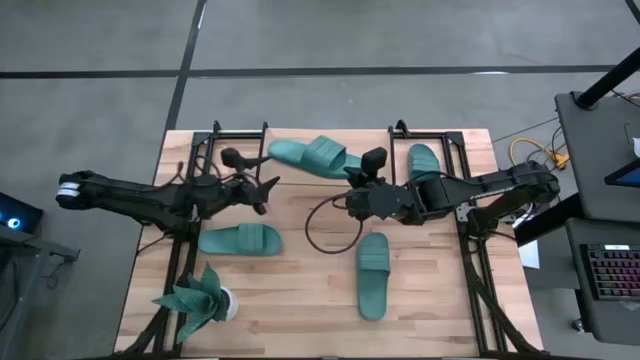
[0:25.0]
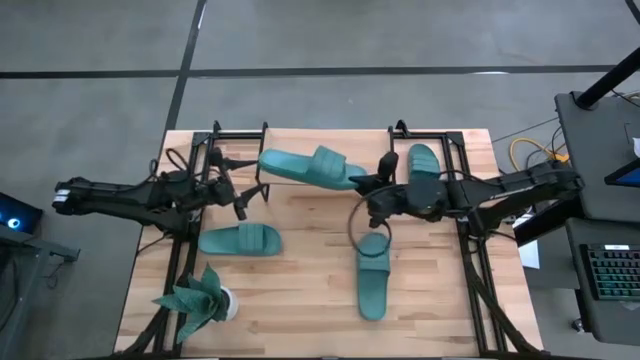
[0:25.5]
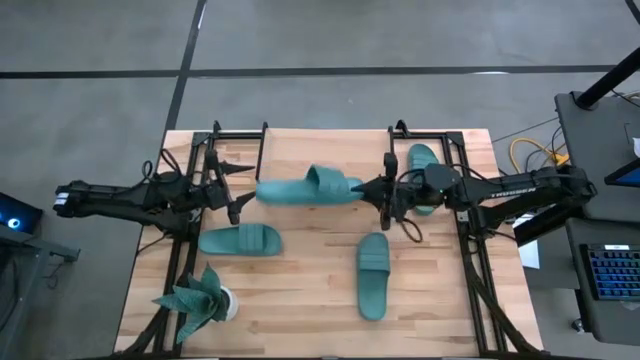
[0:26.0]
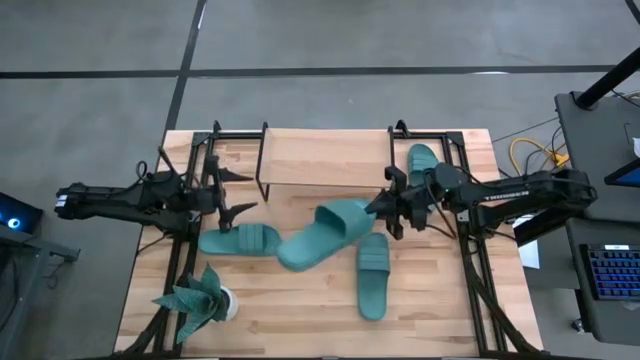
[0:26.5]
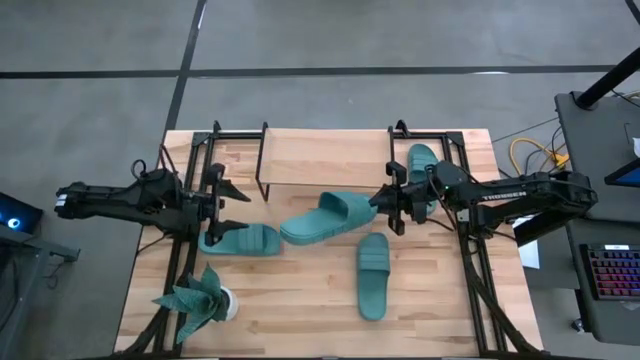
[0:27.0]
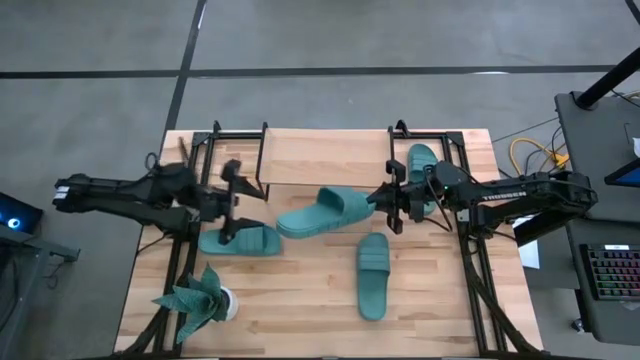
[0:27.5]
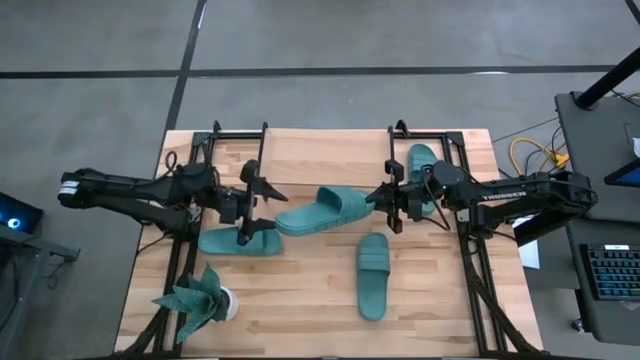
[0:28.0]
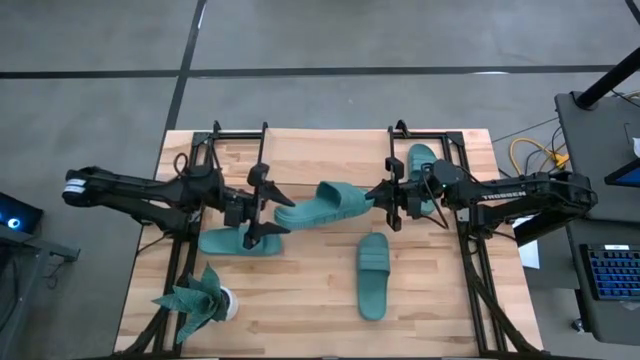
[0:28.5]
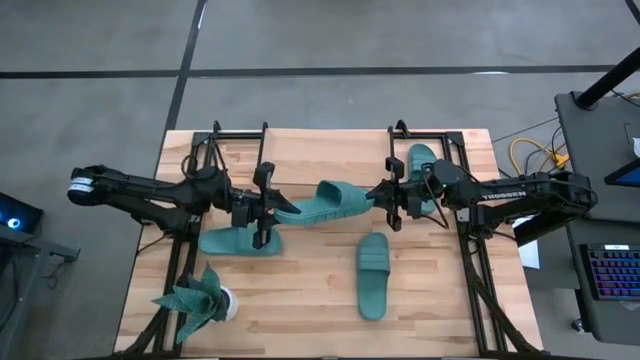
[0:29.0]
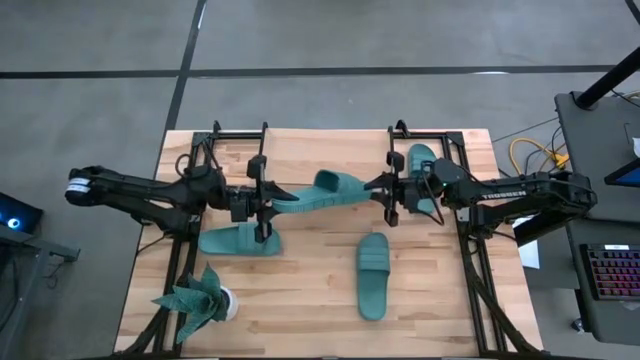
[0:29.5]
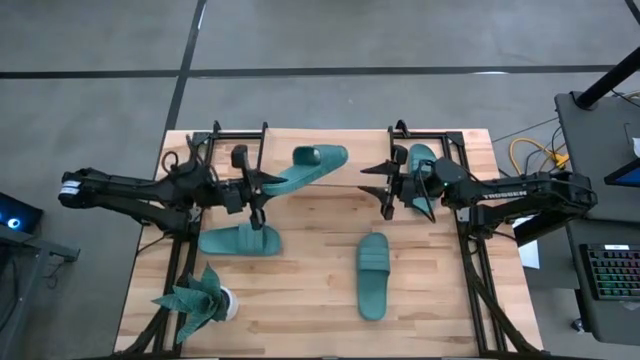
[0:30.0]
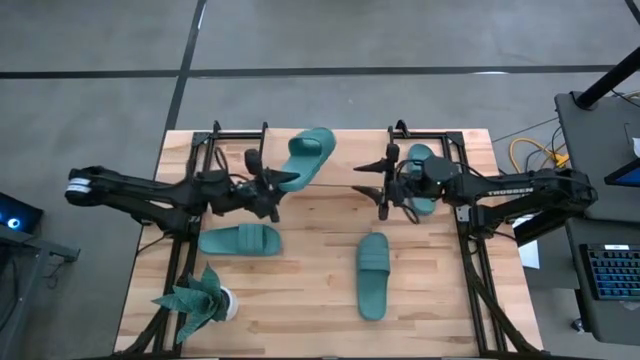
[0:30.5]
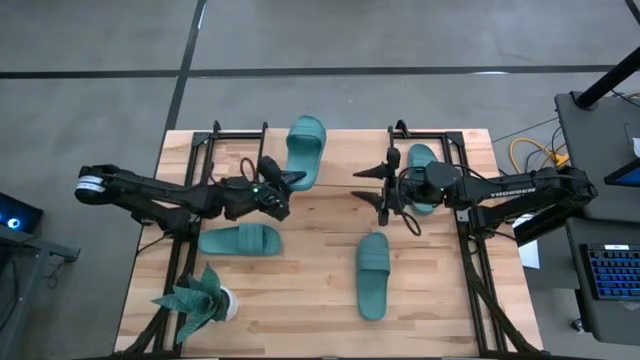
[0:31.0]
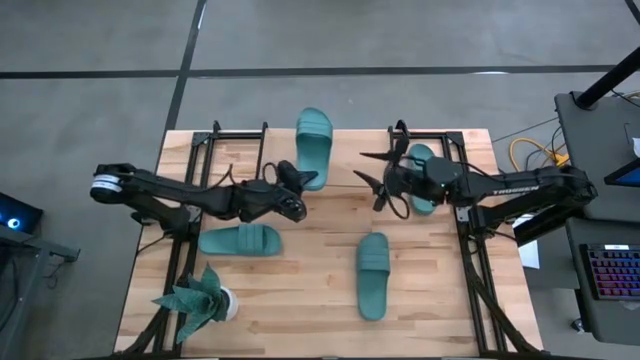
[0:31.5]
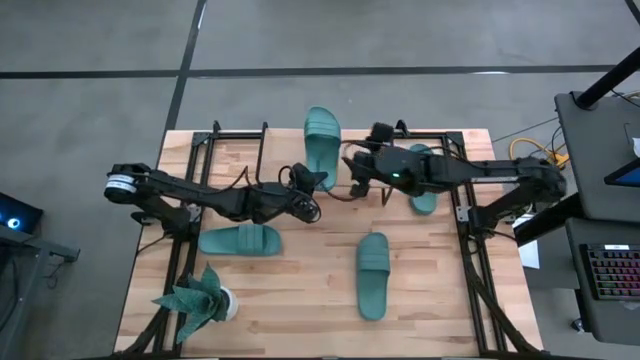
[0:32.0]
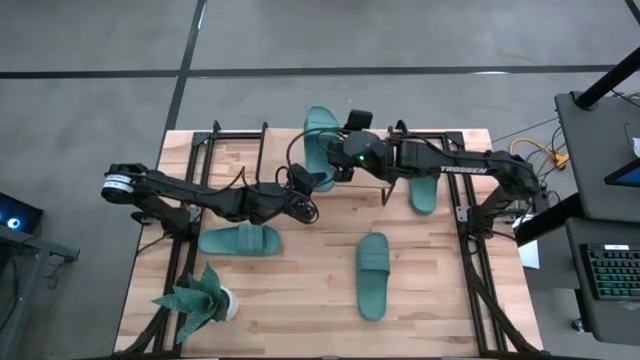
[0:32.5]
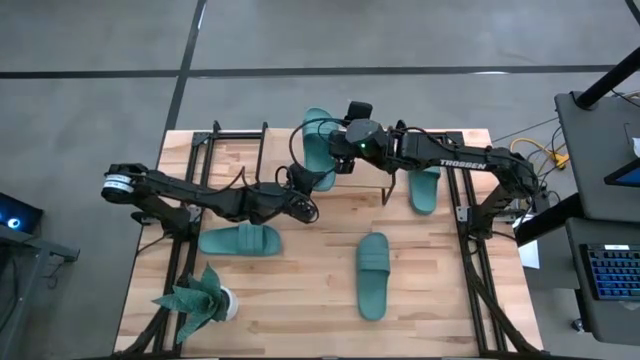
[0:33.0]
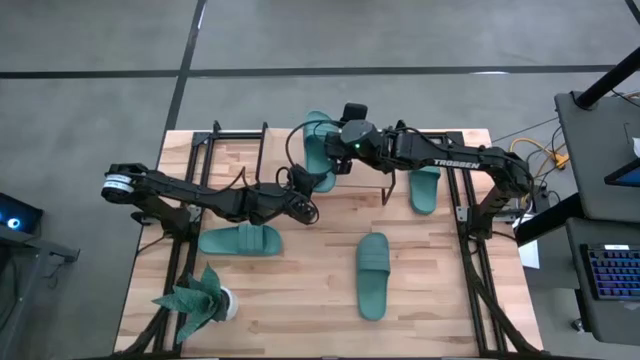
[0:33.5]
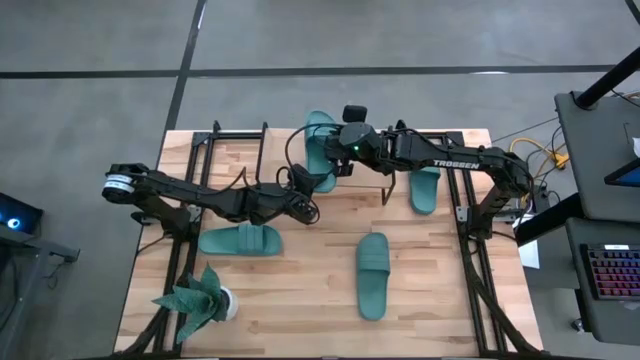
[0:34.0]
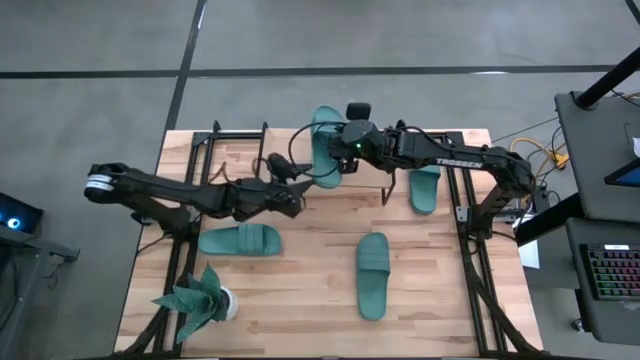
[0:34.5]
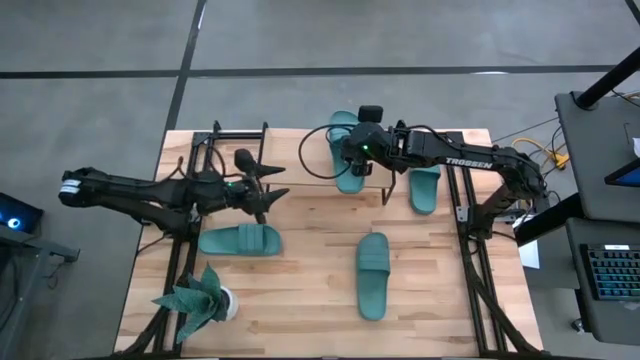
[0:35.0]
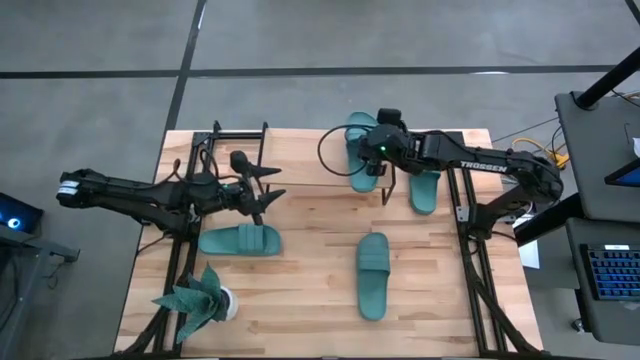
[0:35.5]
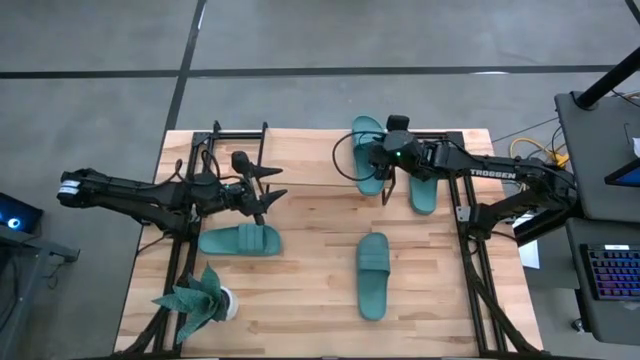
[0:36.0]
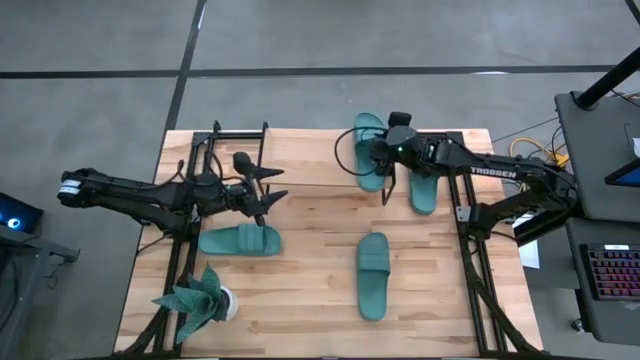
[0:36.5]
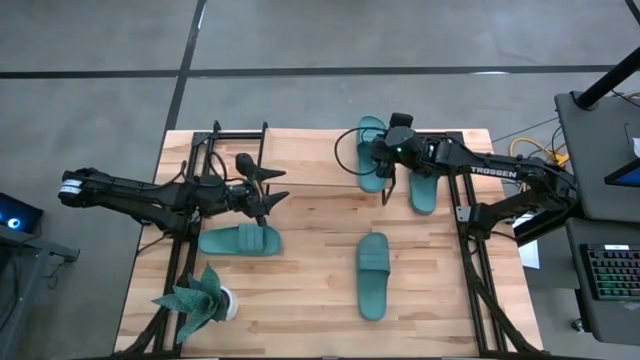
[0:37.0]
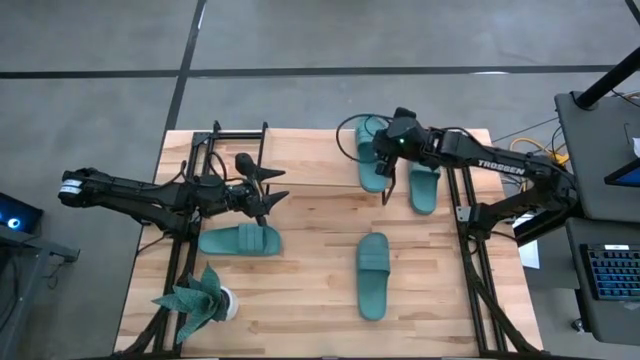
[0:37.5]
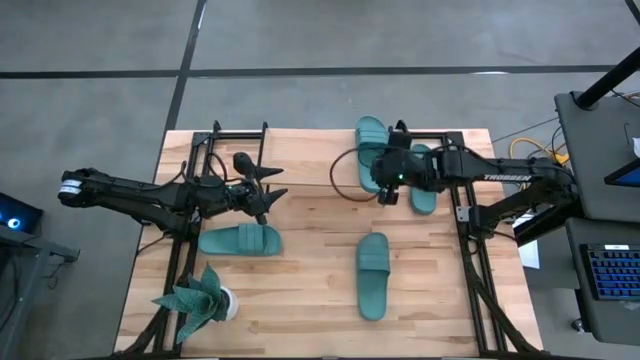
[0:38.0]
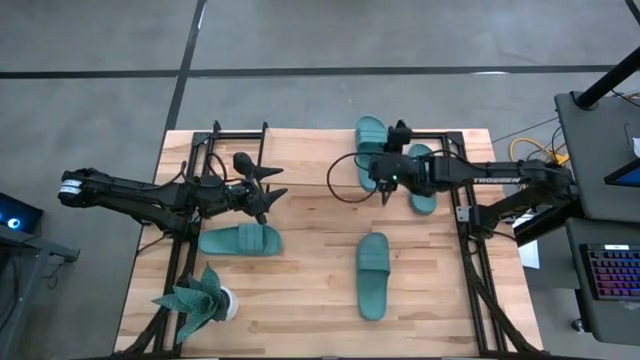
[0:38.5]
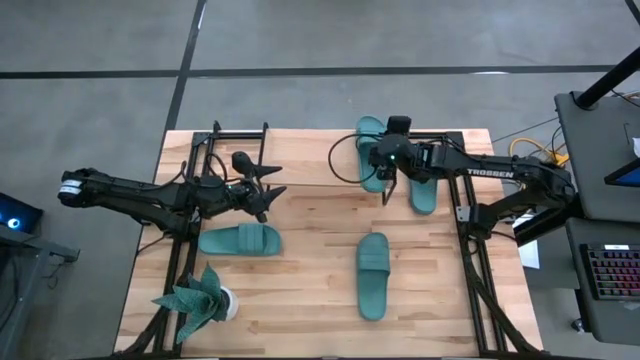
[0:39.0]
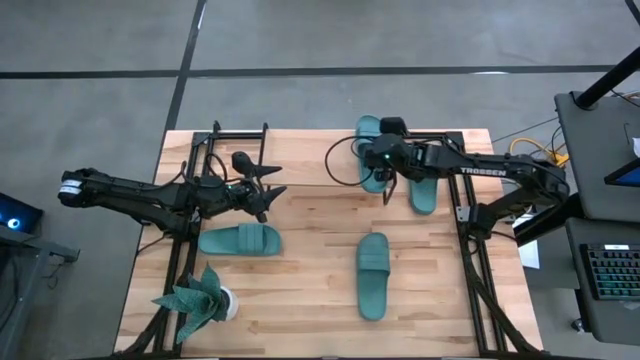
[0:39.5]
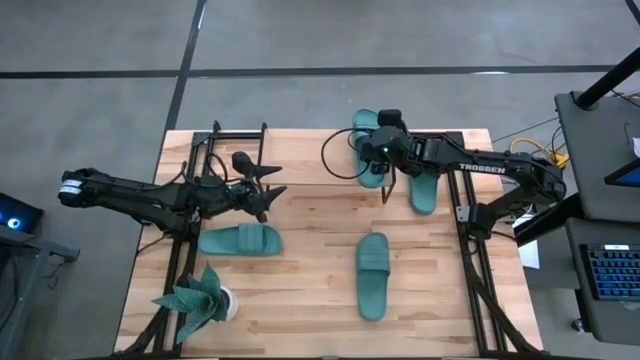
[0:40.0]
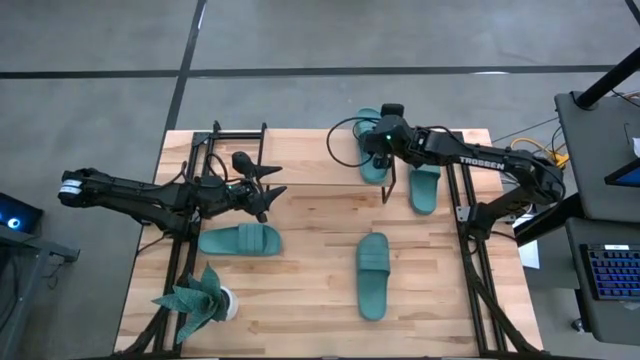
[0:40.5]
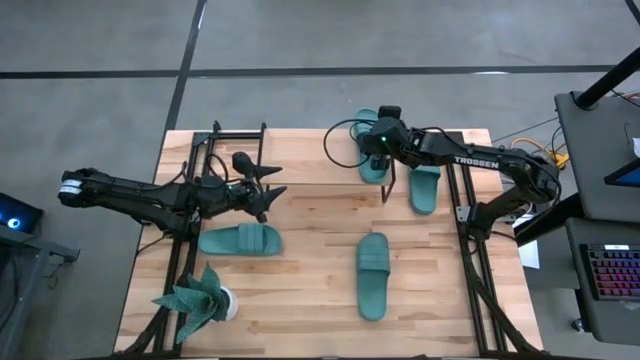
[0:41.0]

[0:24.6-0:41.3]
Task: Pick and place slides into the shelf
Put the green slide on the shelf

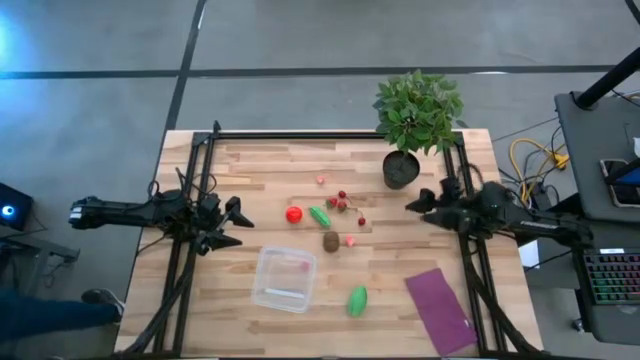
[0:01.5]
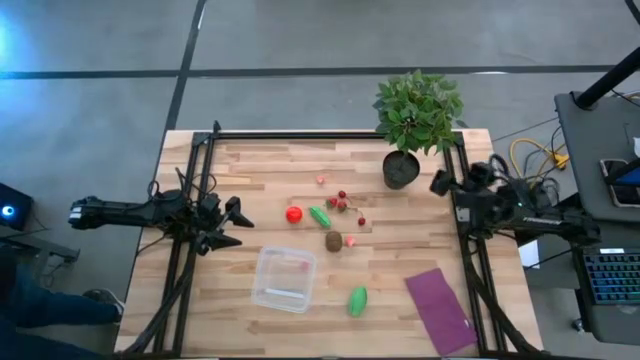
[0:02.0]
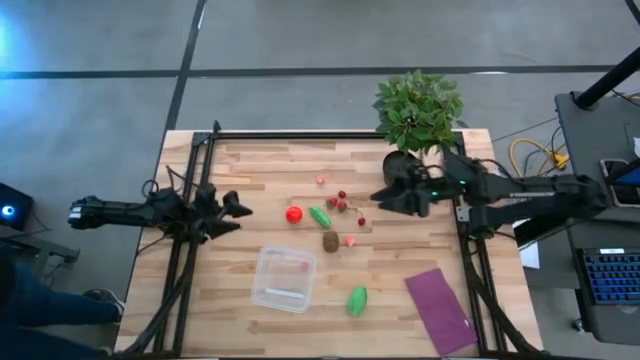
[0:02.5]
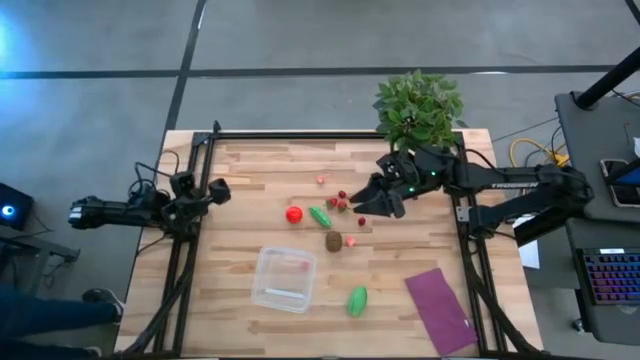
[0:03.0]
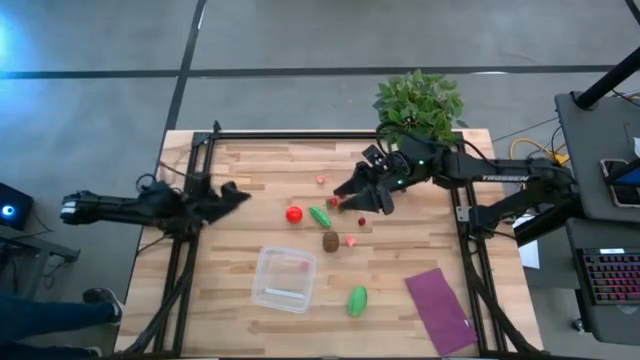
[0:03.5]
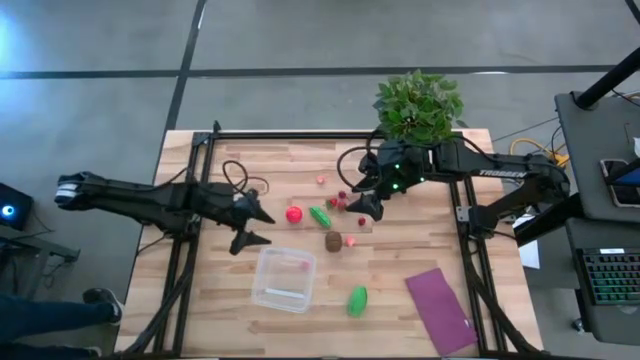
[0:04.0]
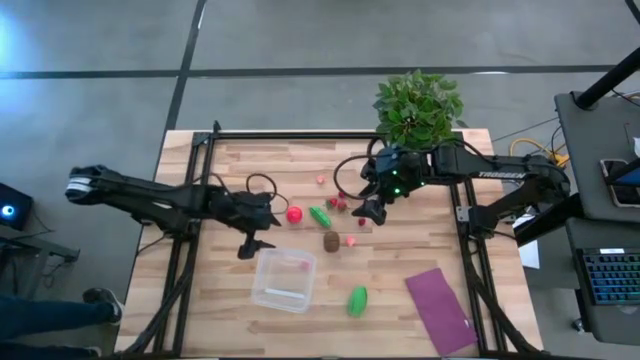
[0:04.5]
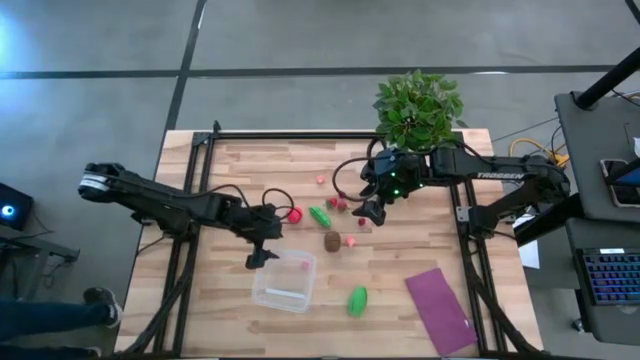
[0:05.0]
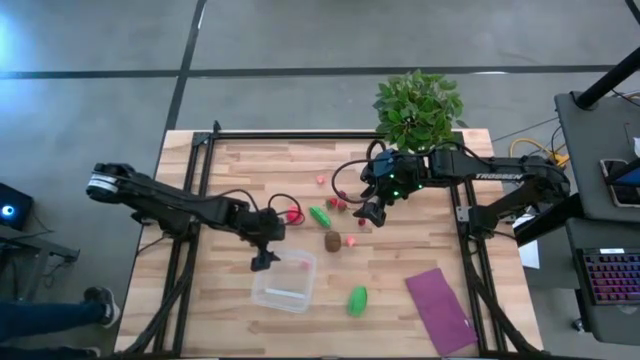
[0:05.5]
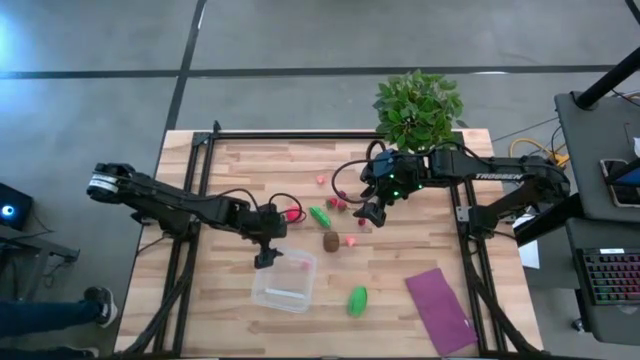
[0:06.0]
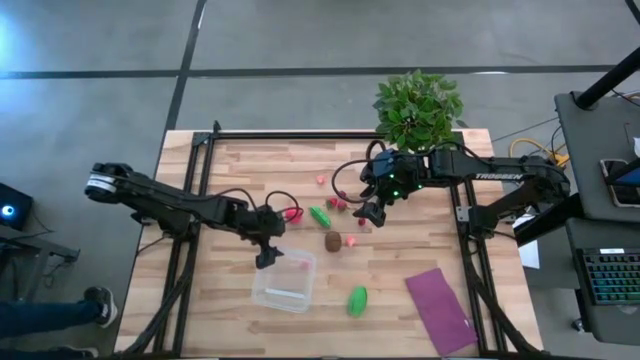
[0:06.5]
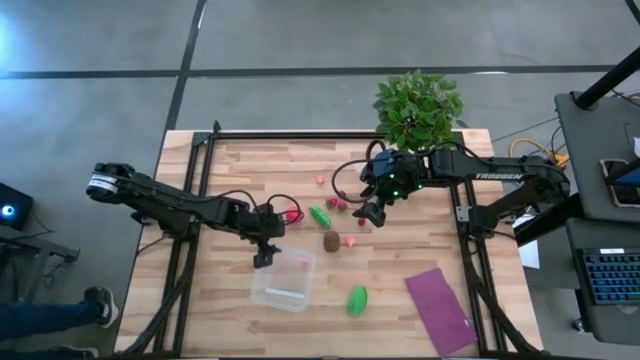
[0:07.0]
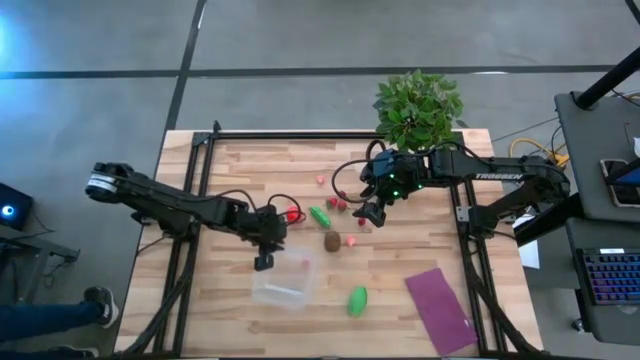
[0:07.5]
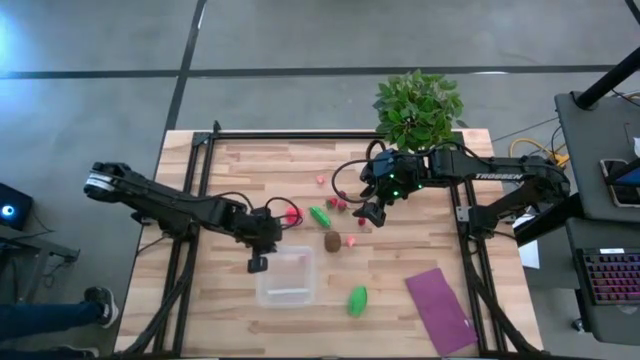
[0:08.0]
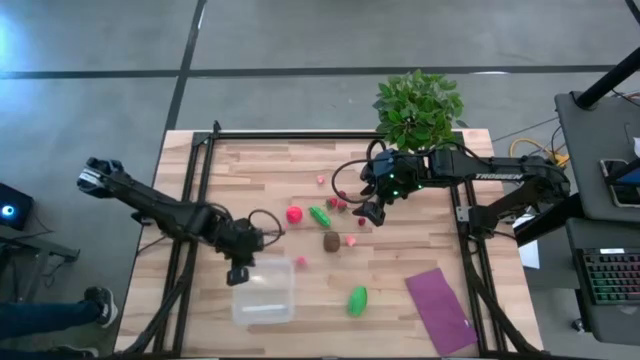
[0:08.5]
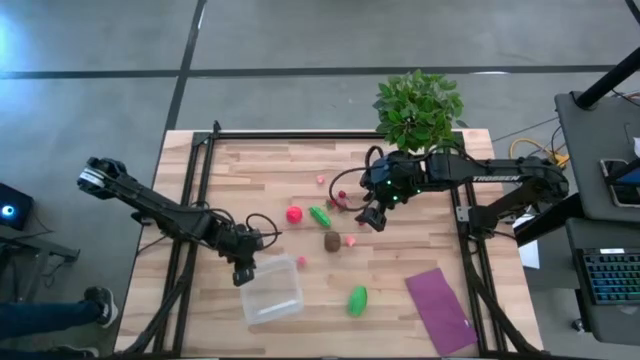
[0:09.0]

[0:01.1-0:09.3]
Task: Pick and placing Produce into tupperware
Move the transparent bin to the bottom center of the shelf
